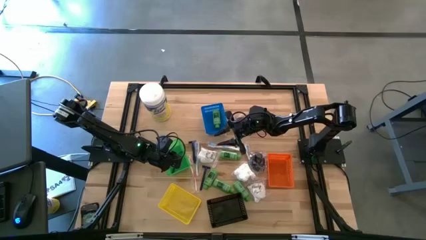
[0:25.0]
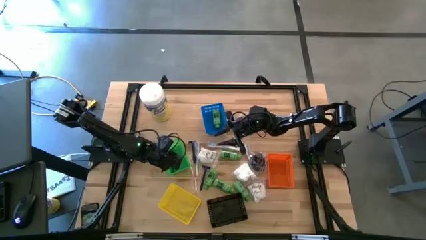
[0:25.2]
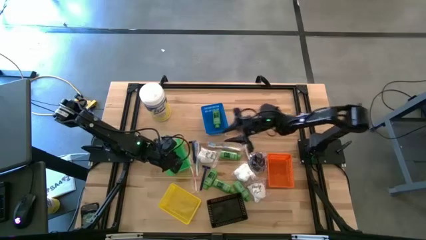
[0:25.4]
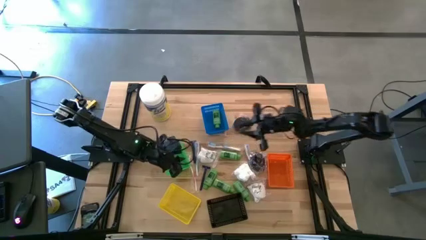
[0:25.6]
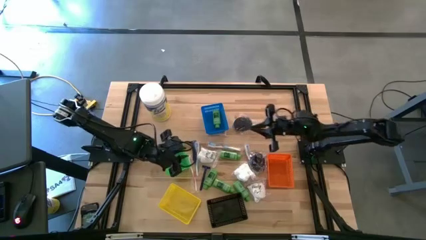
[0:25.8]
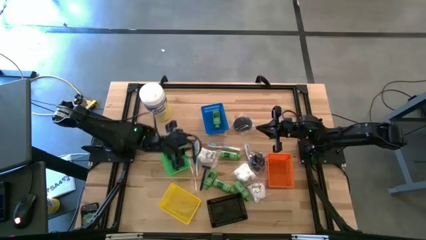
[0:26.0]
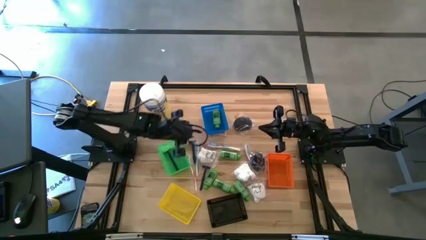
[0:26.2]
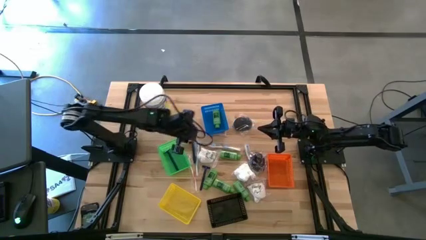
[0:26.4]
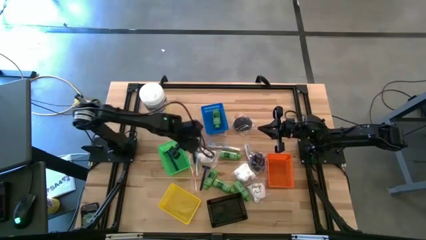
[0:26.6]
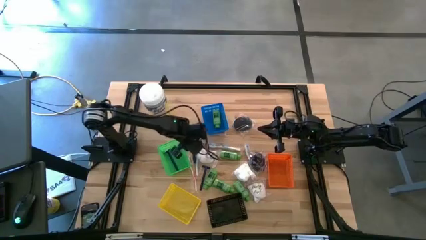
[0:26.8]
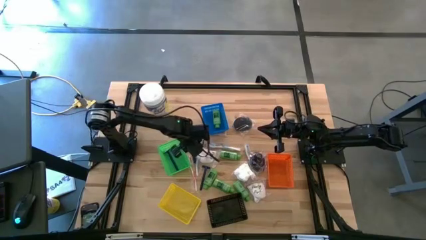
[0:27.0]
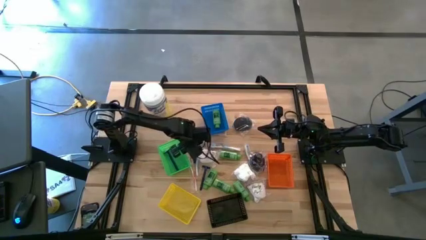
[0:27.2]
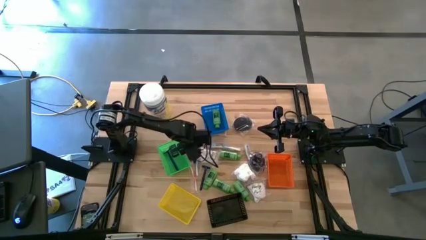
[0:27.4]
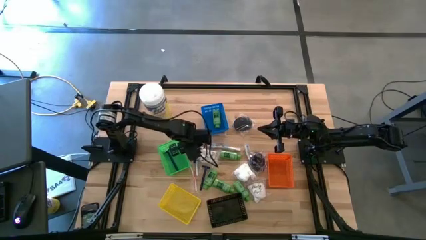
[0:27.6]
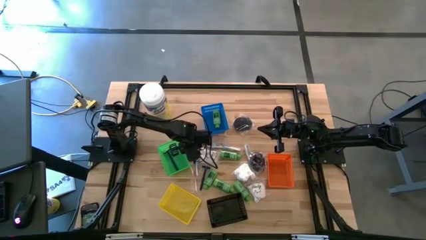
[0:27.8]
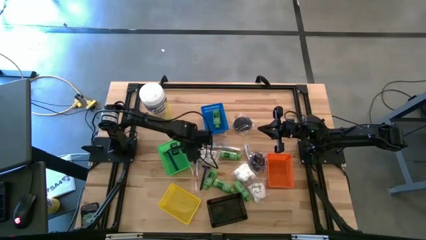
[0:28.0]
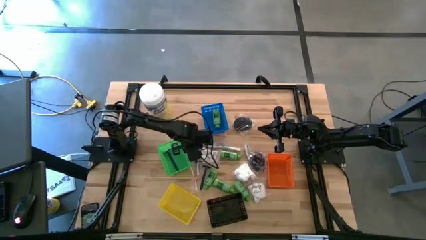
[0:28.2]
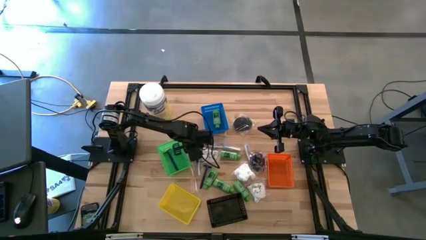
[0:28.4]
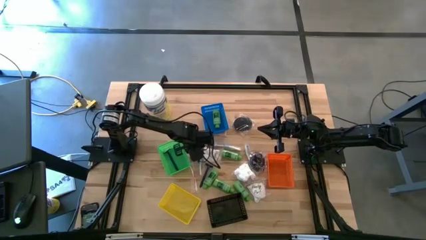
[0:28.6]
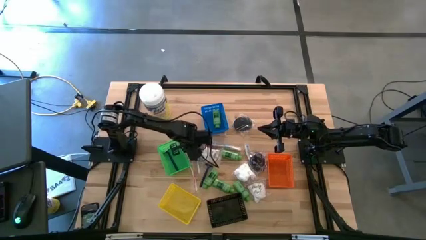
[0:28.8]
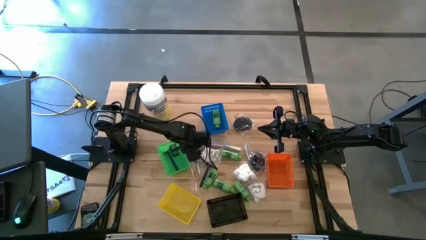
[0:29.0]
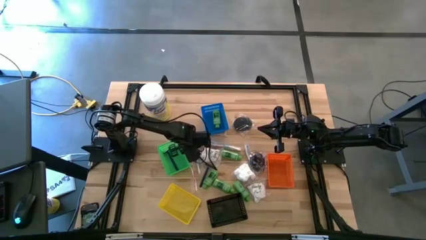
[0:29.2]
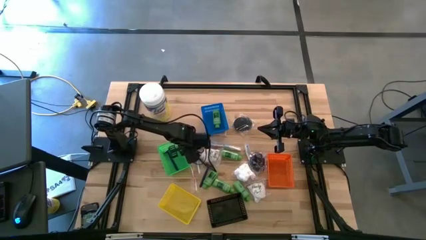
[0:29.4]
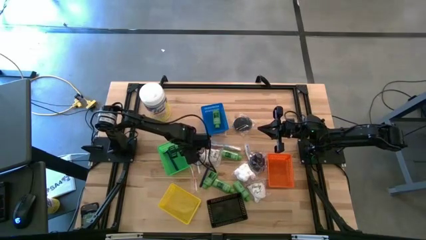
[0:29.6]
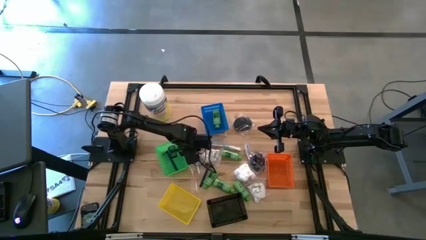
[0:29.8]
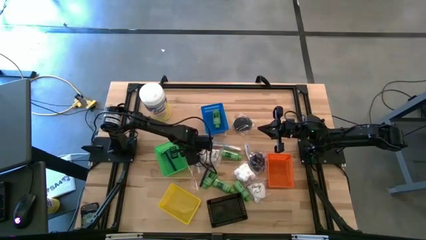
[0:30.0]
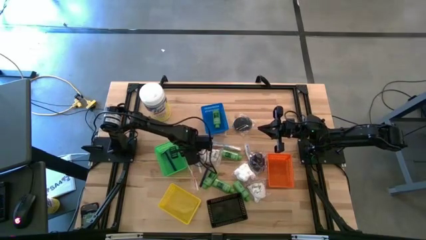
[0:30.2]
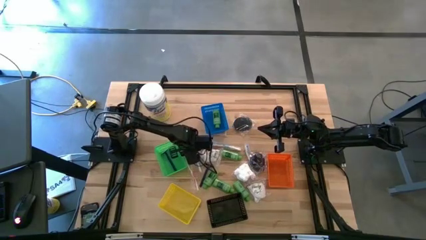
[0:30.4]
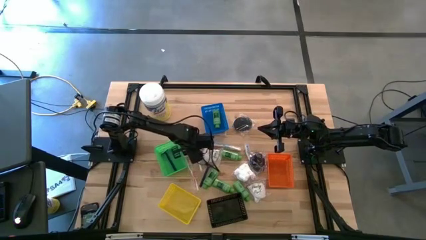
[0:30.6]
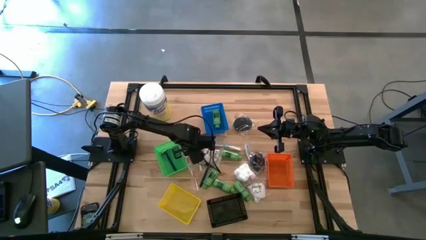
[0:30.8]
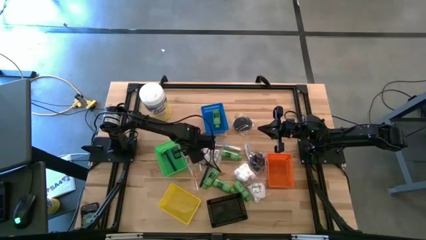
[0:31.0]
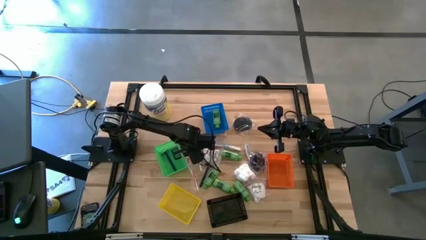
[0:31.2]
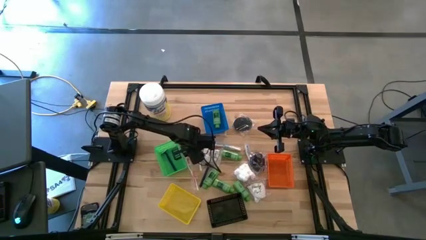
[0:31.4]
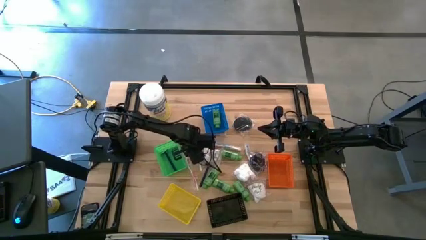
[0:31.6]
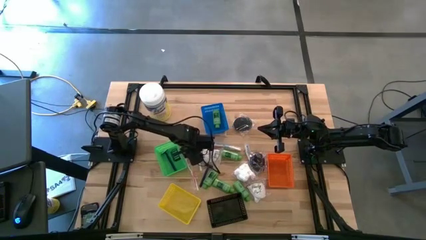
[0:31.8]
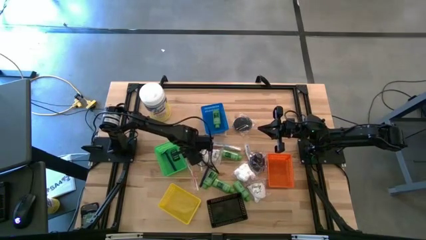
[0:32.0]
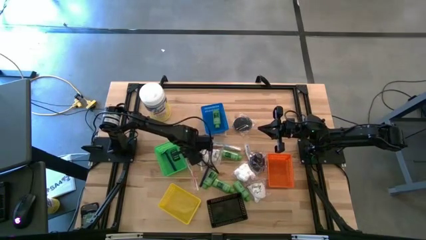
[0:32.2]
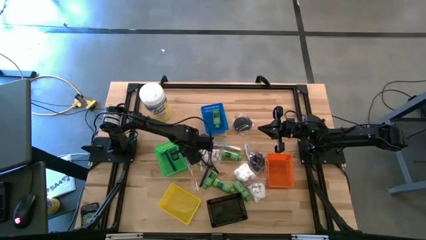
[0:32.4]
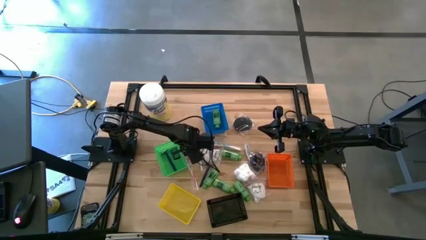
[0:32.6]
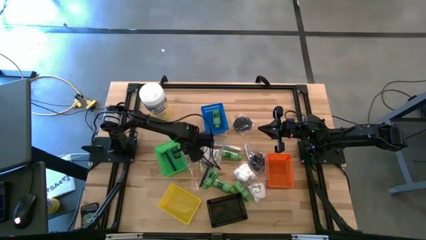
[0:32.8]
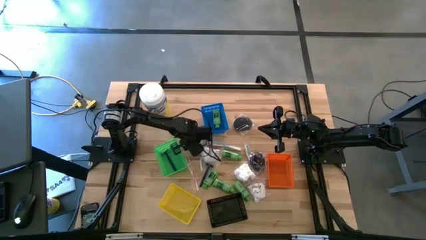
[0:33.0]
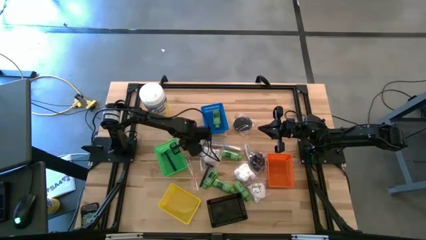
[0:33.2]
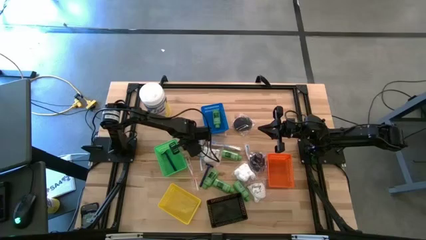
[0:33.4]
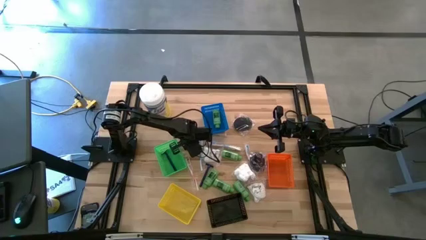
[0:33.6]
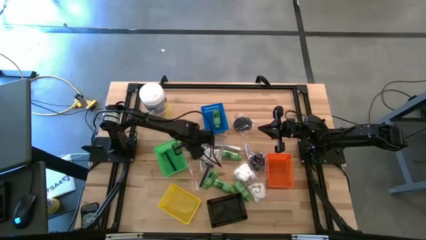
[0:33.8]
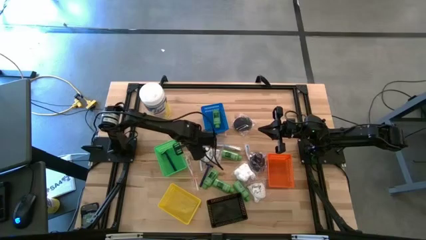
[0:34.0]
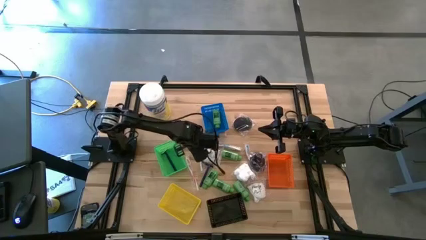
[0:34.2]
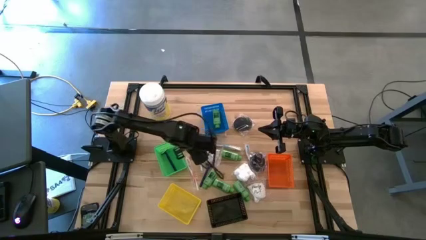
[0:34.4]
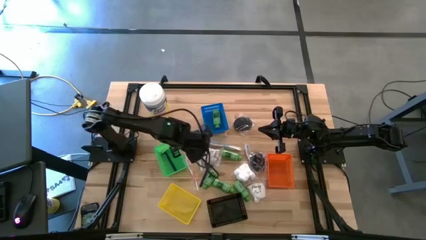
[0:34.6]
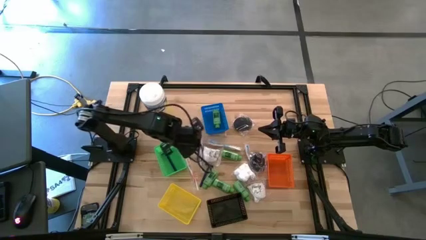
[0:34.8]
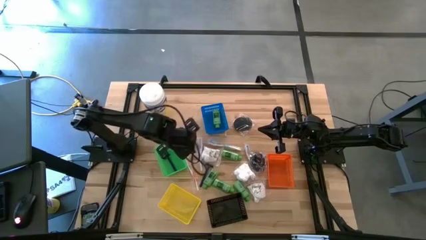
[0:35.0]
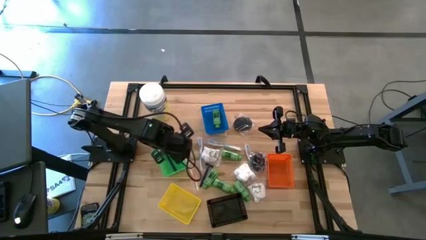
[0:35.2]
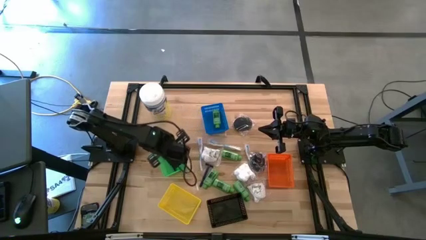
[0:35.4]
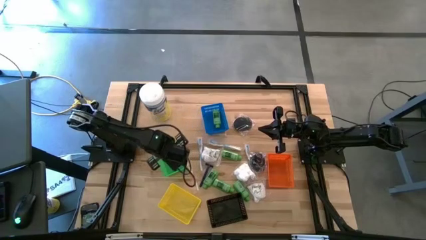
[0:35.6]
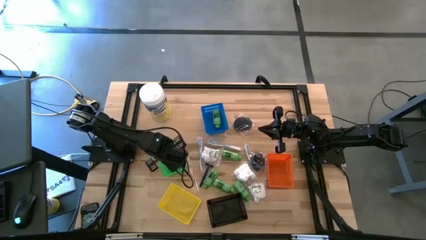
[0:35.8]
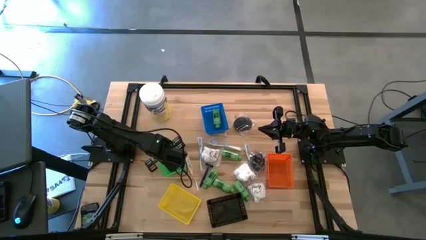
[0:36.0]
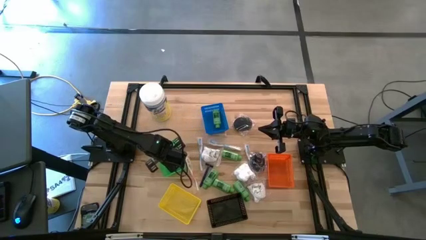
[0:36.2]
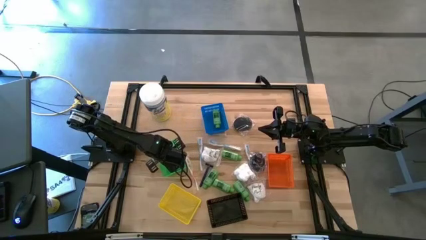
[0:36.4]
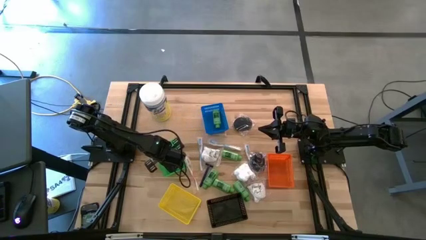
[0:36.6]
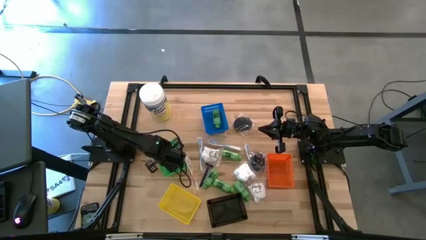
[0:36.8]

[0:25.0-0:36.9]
Task: Pick & Place Travel size toiletries
Put the razor into the green bin

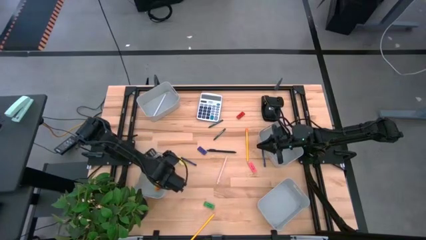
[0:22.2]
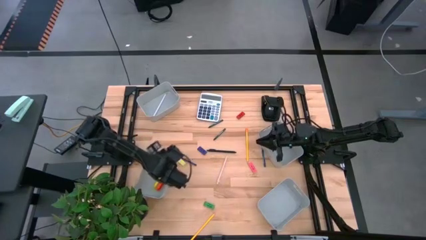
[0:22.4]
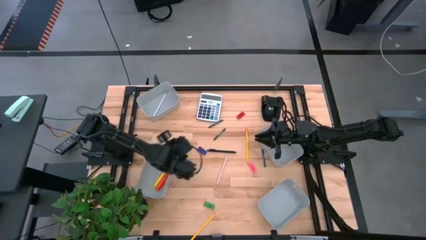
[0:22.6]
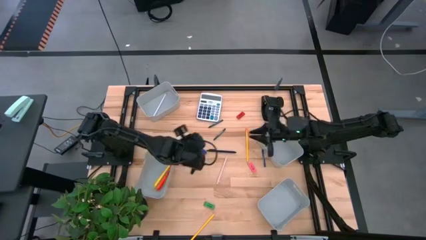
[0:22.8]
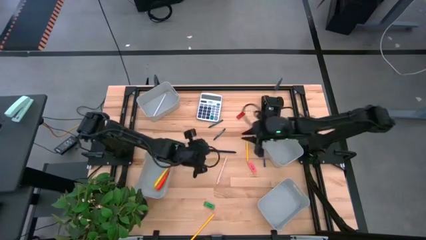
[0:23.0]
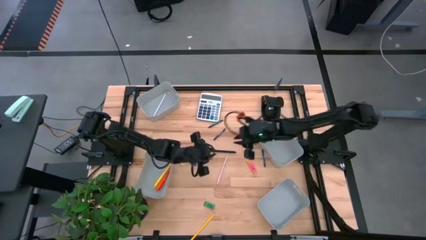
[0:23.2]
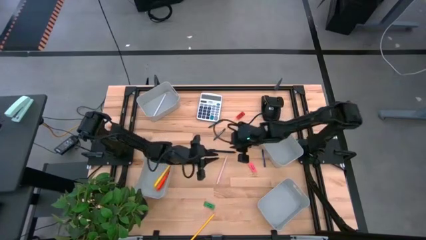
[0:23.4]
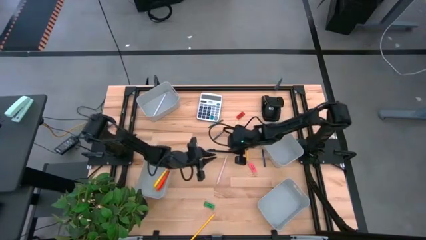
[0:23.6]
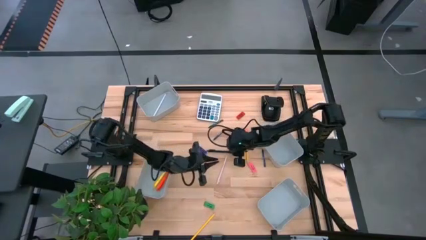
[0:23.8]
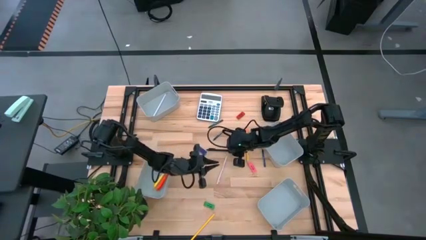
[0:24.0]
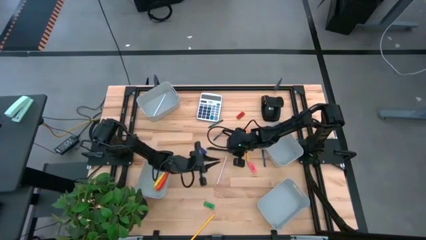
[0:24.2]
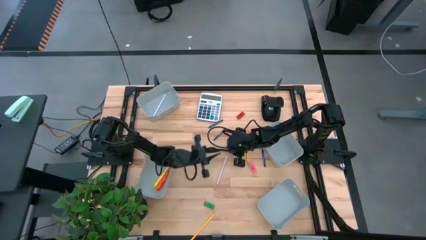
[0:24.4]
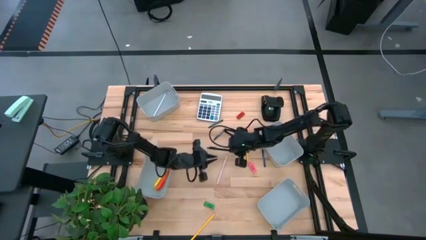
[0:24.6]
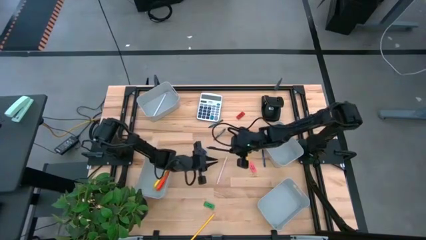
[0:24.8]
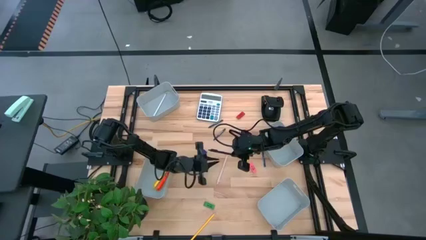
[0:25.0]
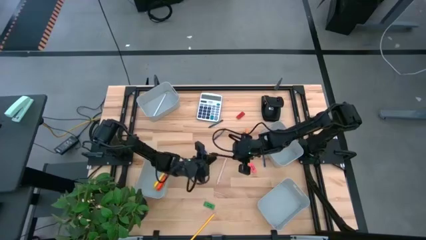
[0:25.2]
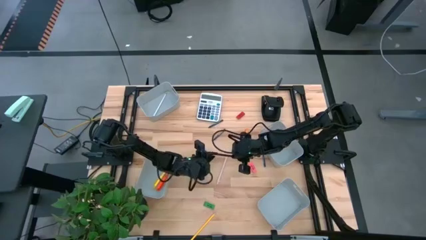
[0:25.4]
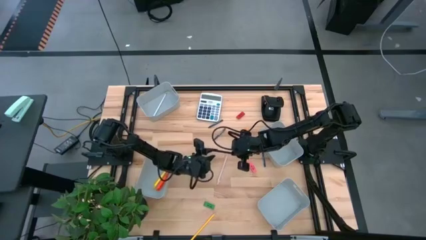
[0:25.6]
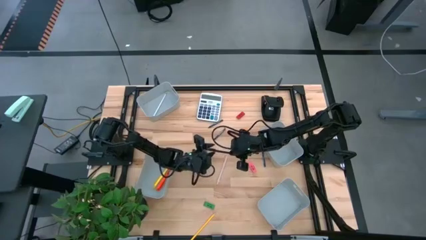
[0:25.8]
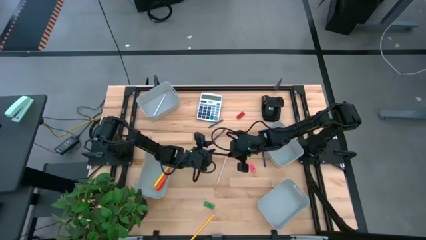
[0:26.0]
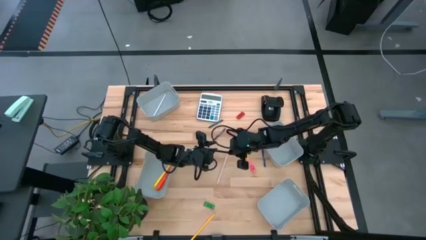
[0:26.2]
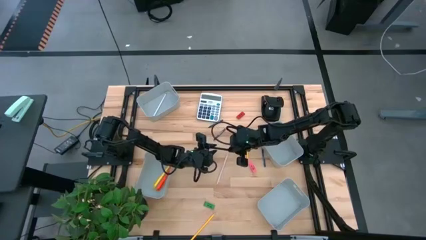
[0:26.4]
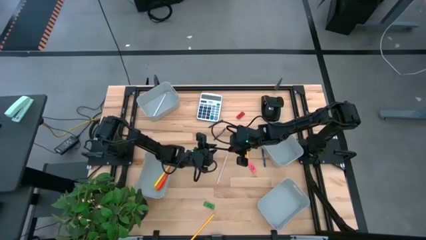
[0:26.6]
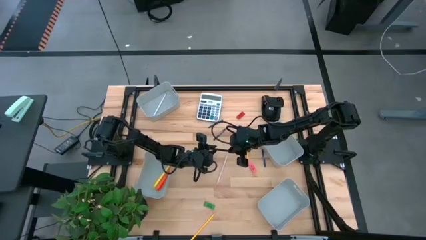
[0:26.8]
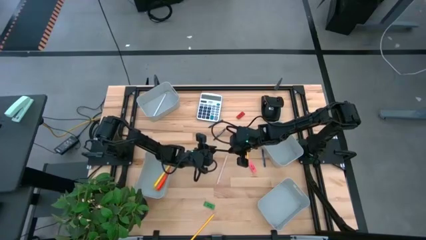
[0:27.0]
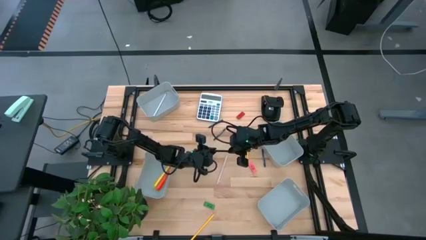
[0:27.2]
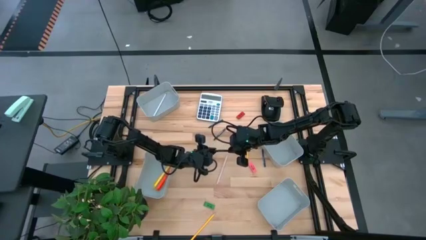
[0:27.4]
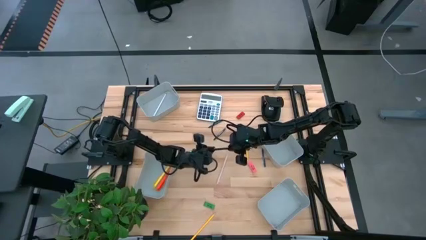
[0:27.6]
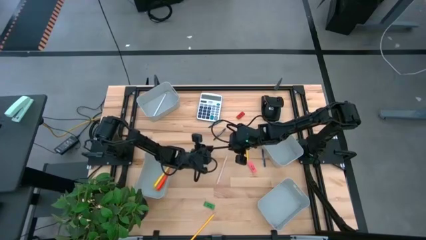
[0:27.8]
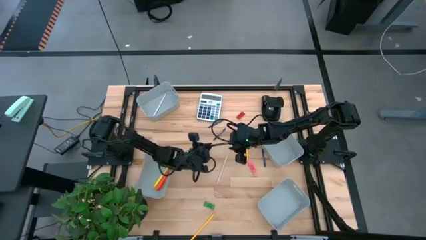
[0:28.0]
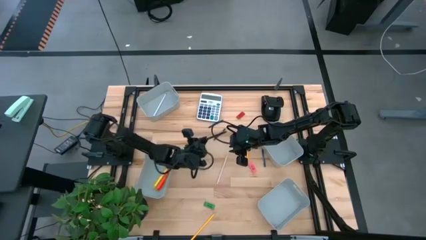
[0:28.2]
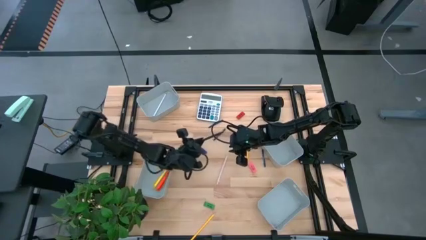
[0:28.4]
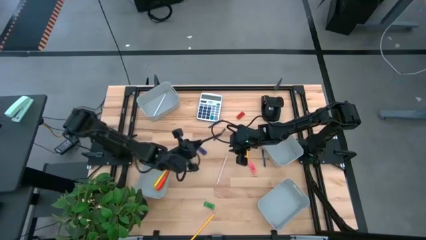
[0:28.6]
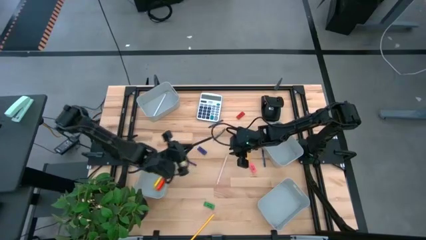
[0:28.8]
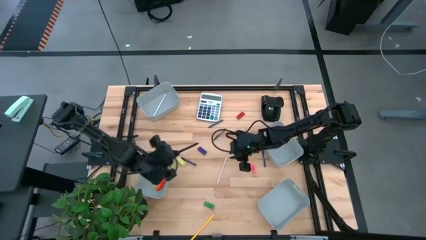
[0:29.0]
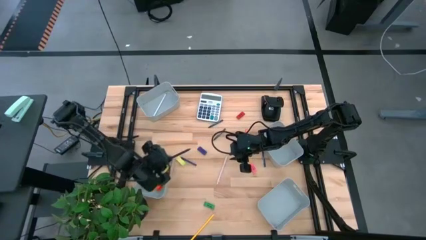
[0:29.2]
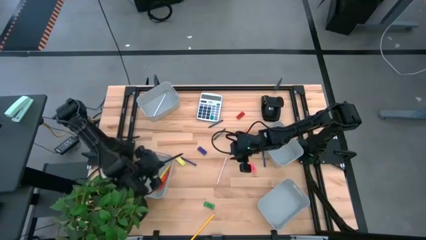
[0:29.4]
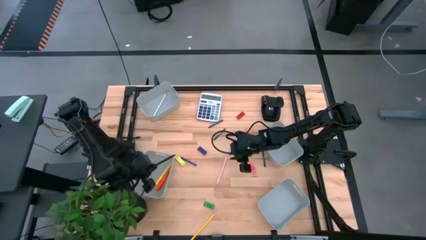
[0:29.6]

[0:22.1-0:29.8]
Task: Sort crayons/erasers/pens/pencils in bins
Put the black ballpen into the bottom left gray bin
